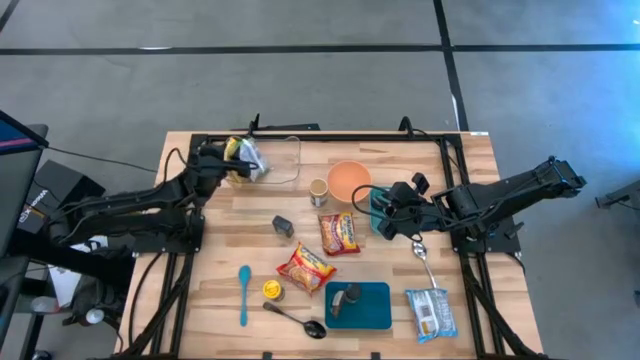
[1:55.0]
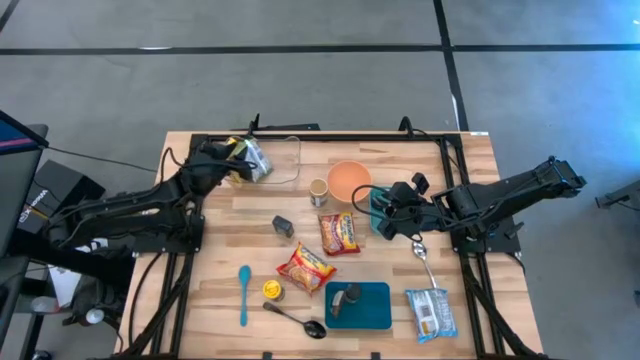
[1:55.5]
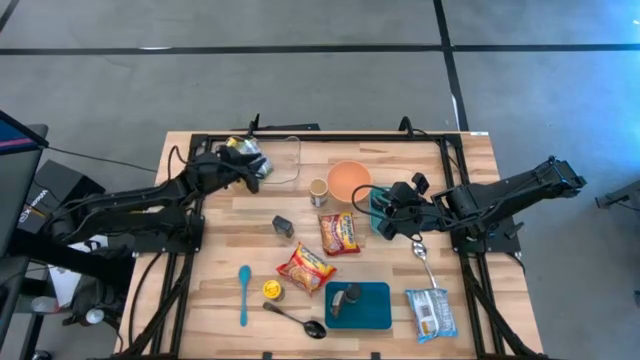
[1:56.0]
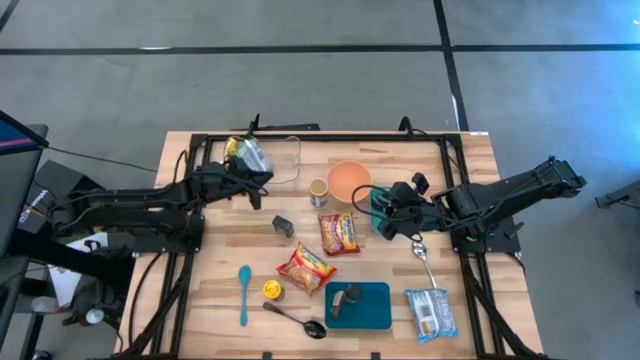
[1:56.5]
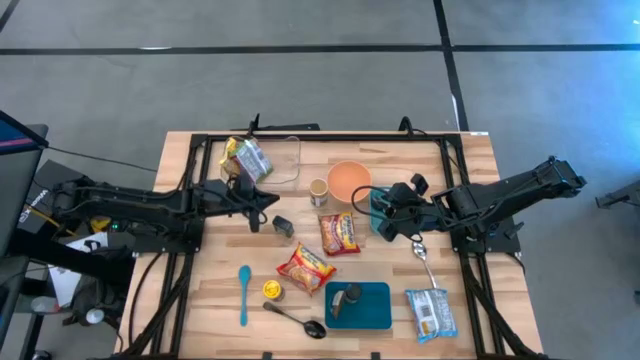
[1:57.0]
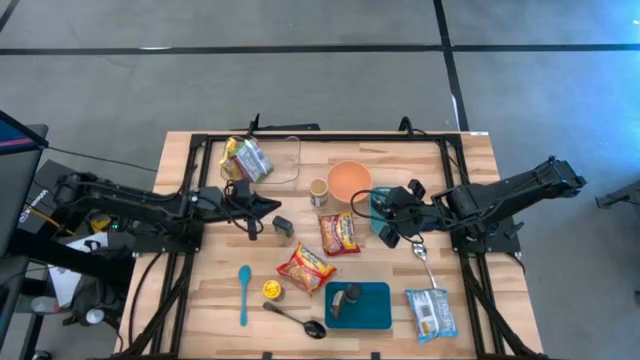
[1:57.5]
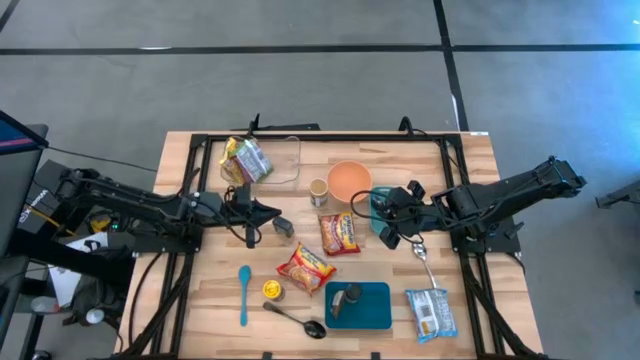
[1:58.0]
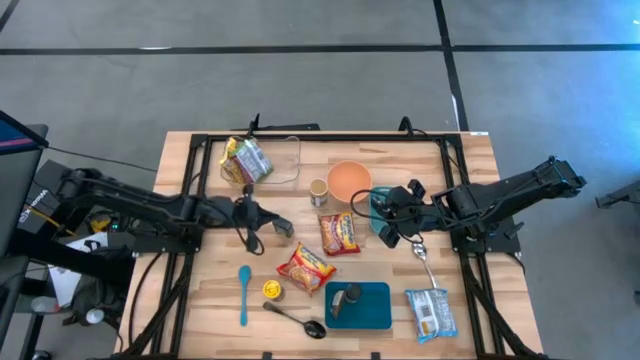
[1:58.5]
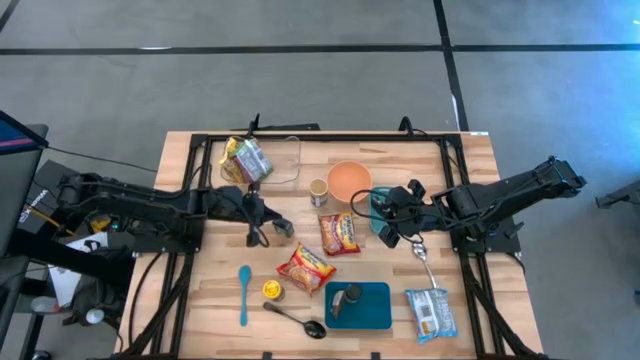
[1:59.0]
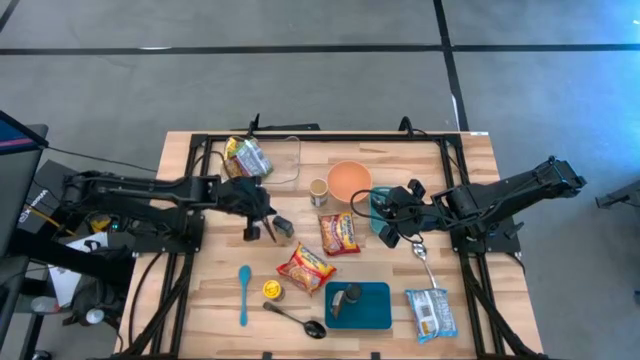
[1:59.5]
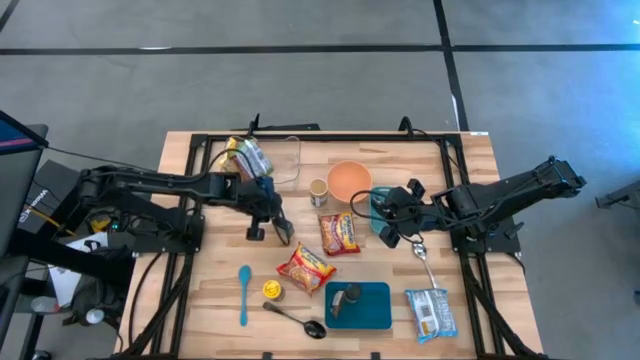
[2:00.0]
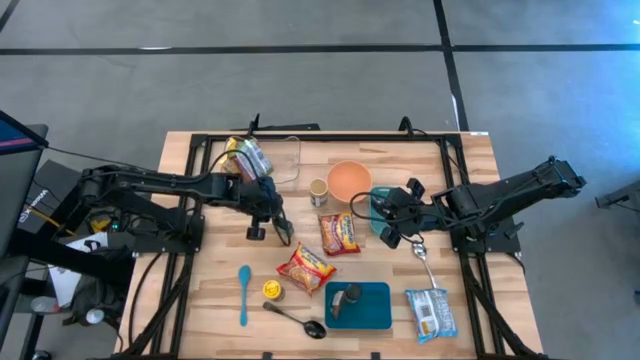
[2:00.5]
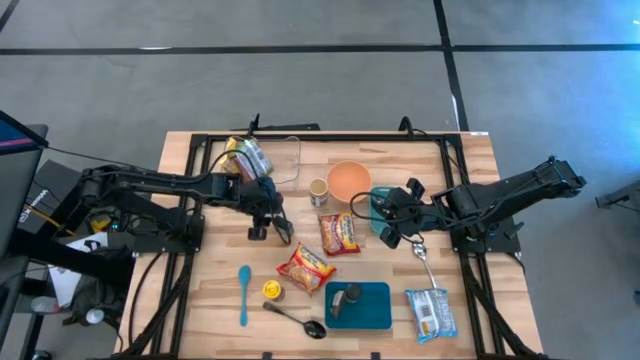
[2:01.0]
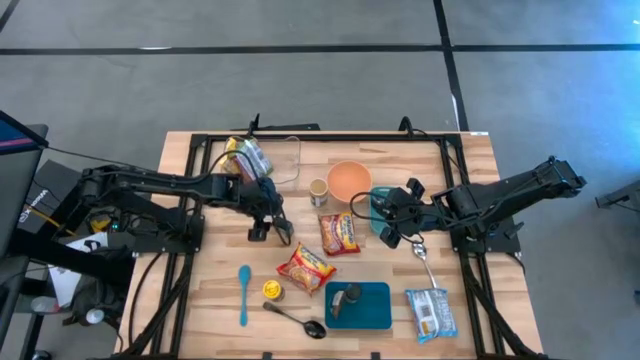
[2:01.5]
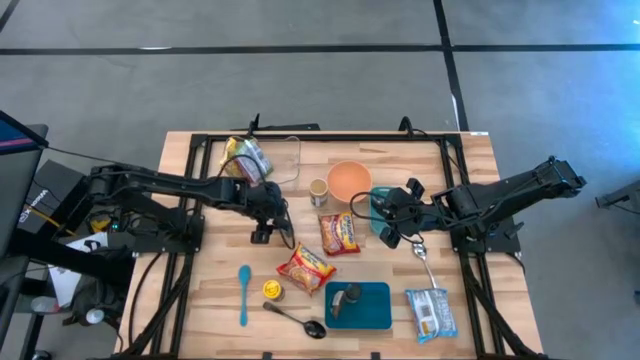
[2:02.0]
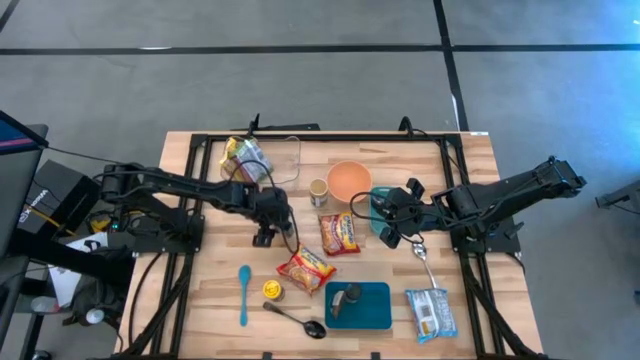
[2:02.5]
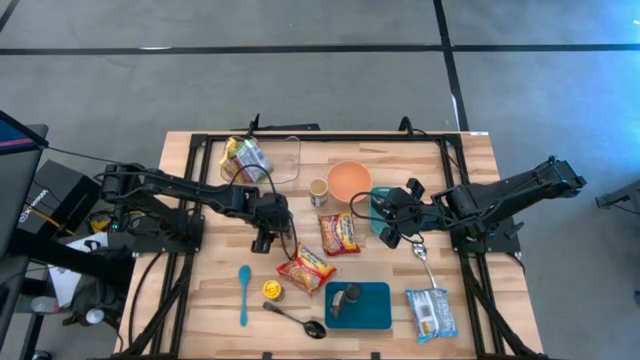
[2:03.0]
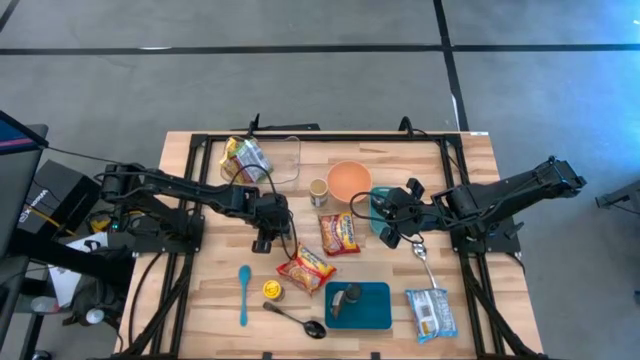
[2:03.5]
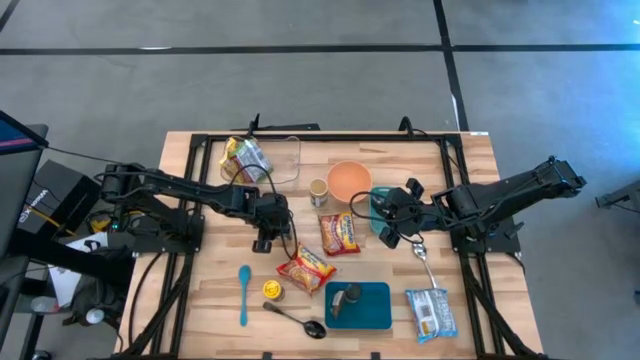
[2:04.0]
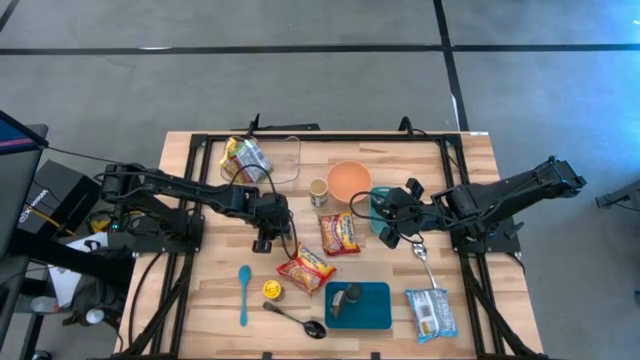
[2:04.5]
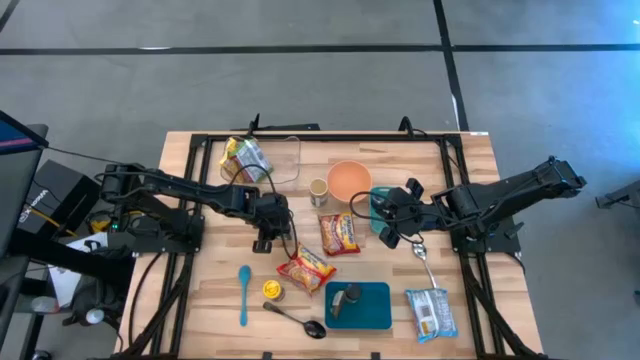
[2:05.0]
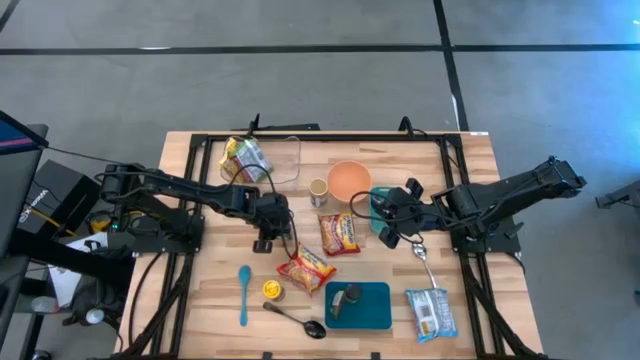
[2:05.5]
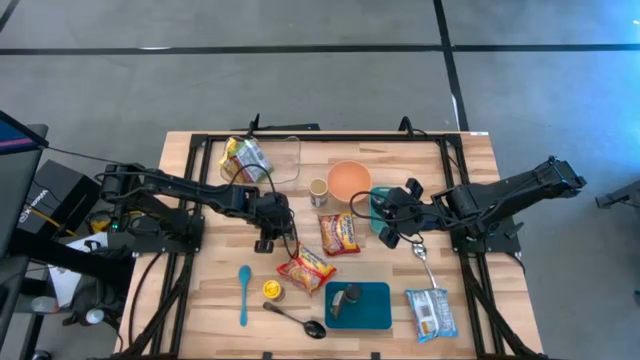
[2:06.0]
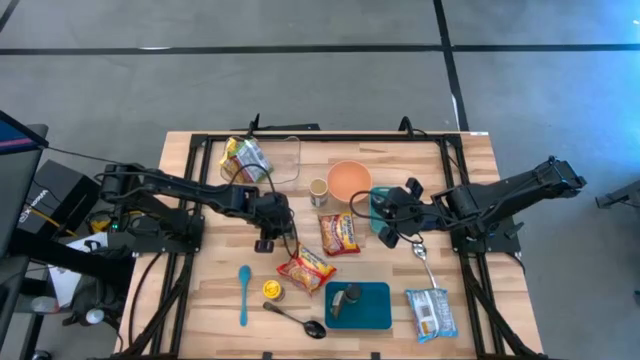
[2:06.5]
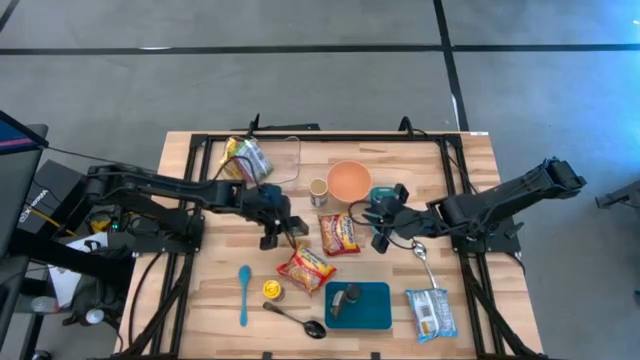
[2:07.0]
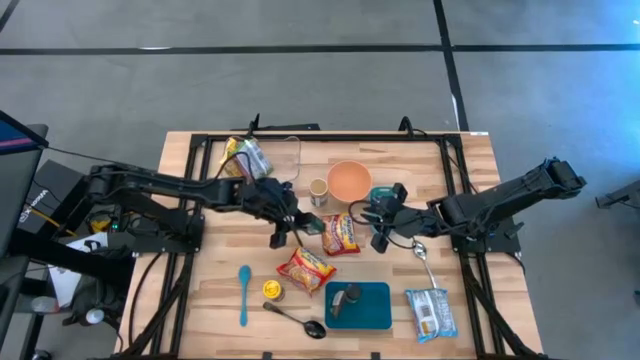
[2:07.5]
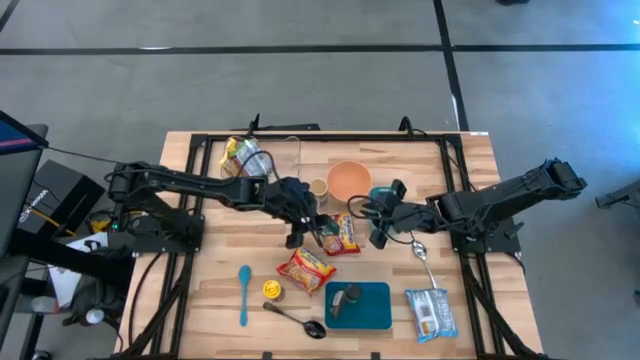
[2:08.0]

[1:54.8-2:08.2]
Task: Pick & Place Food Item
Put the black seasoning can into the blue bin

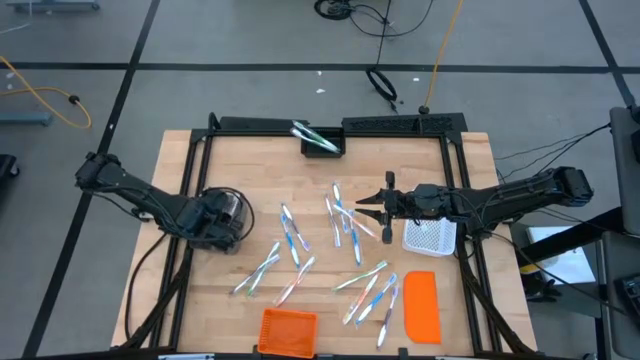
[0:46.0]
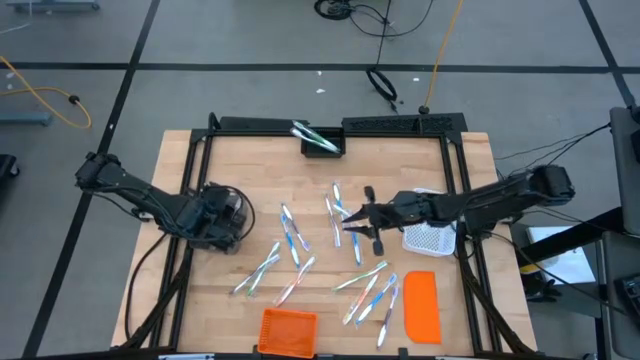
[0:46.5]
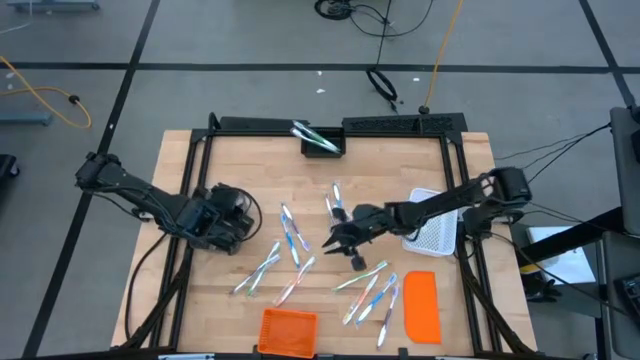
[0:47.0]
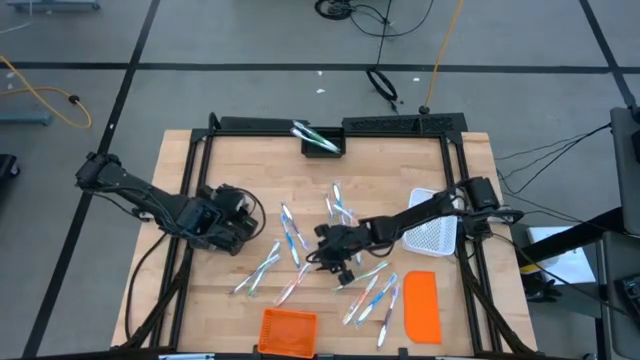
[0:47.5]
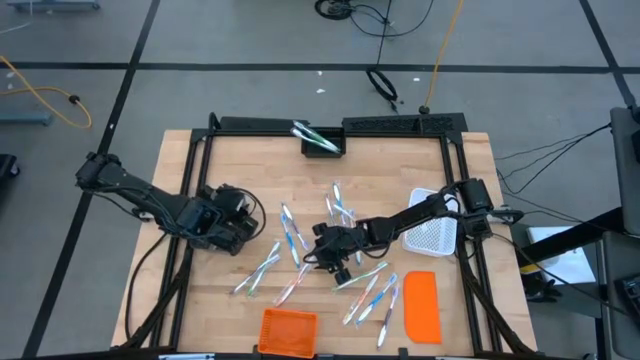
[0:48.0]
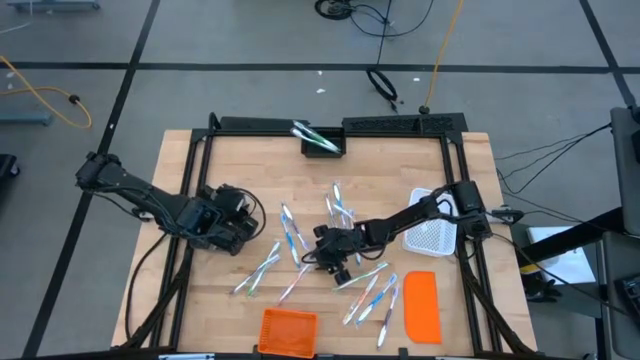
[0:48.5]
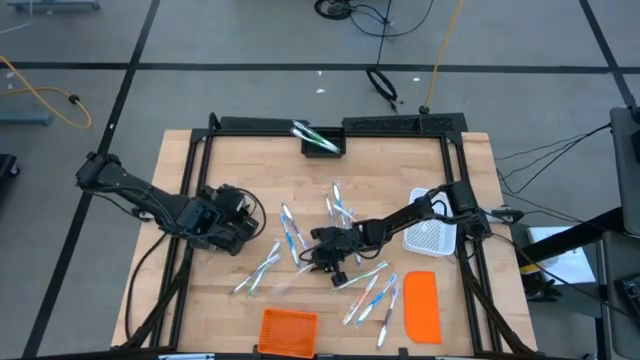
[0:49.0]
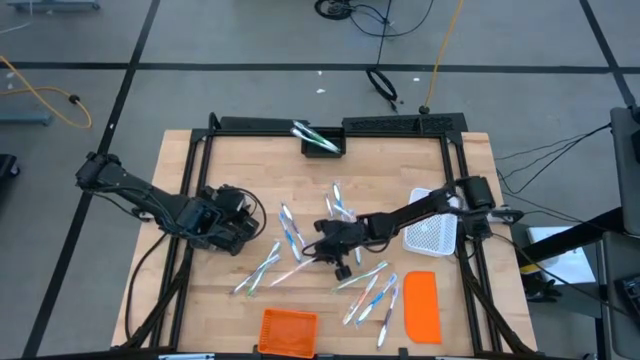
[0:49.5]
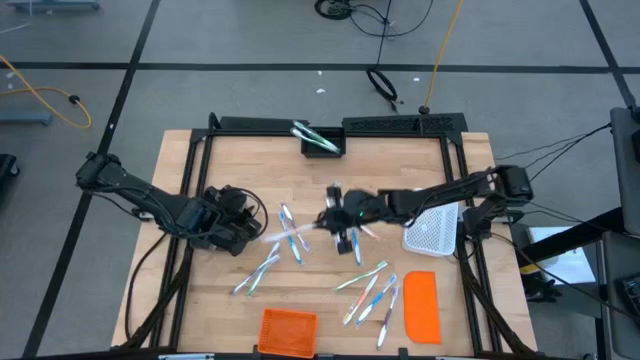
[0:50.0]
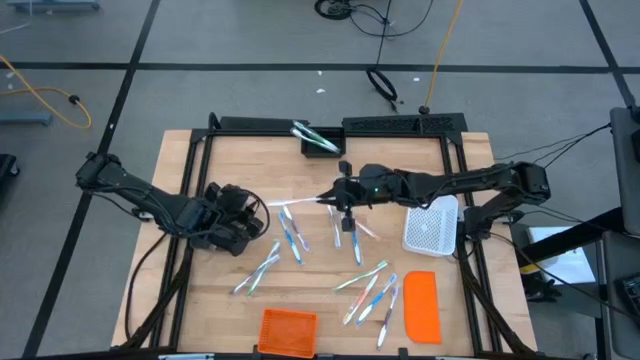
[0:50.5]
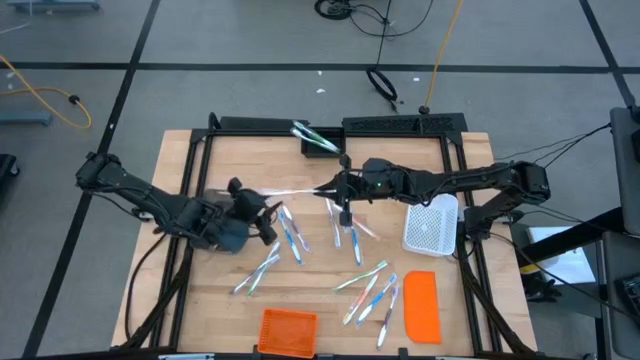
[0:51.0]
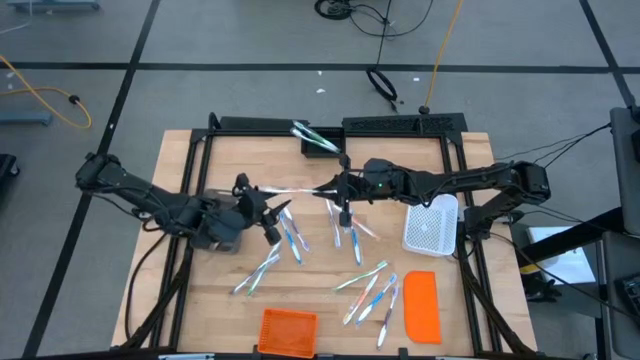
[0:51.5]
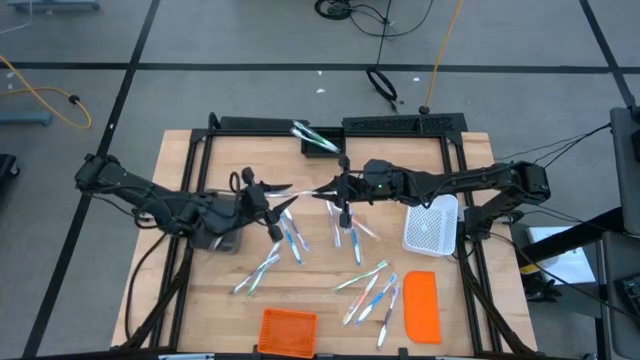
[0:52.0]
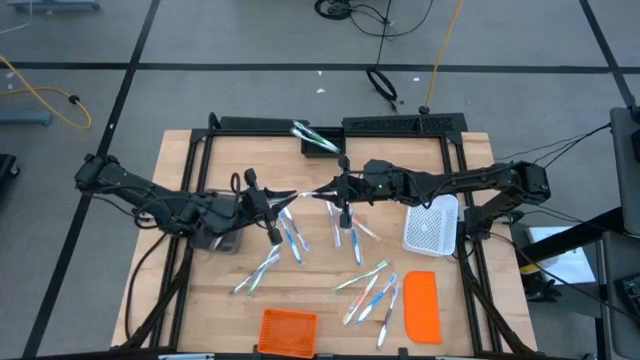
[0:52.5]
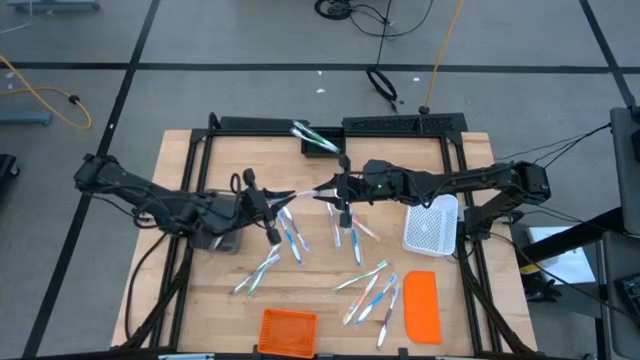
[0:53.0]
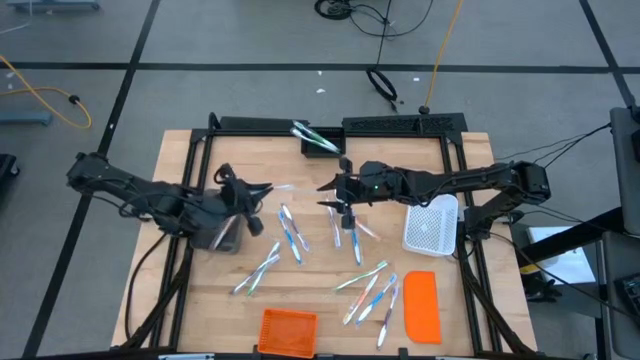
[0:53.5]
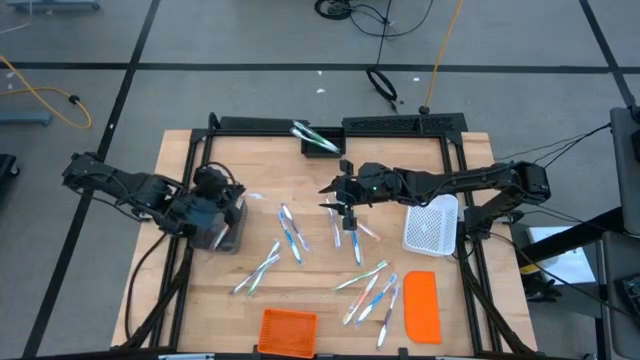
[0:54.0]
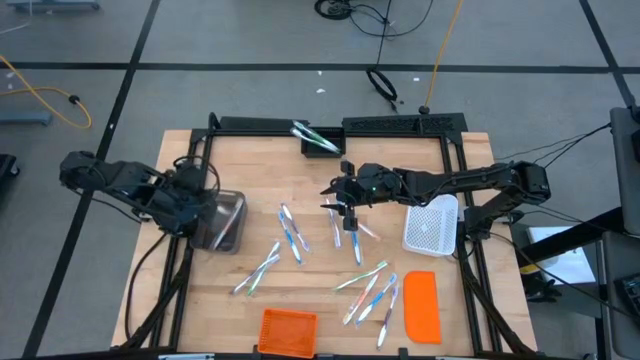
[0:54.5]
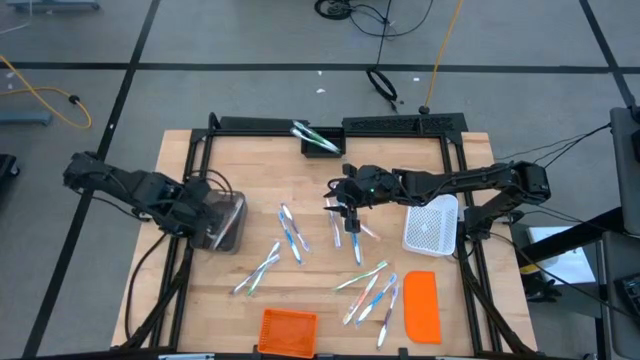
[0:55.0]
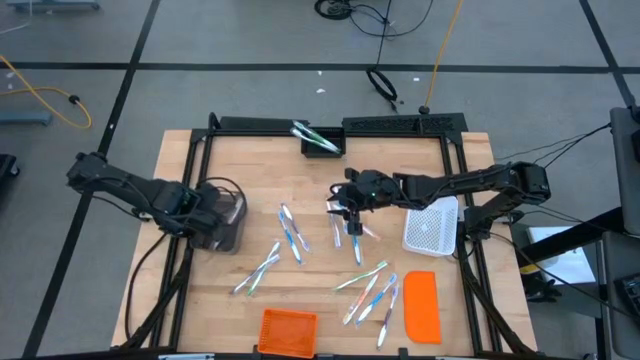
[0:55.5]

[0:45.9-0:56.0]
Task: Pick & Place Toothbrushes
Put the orange toothbrush into the transparent black bin
